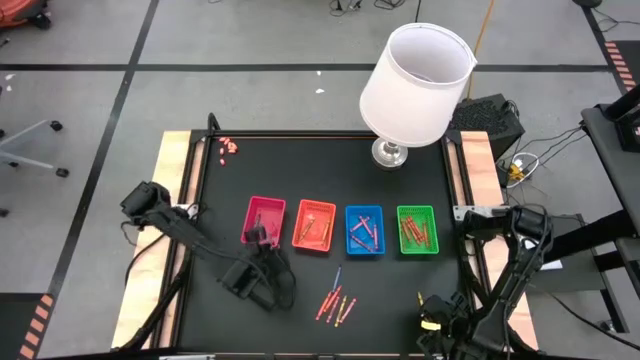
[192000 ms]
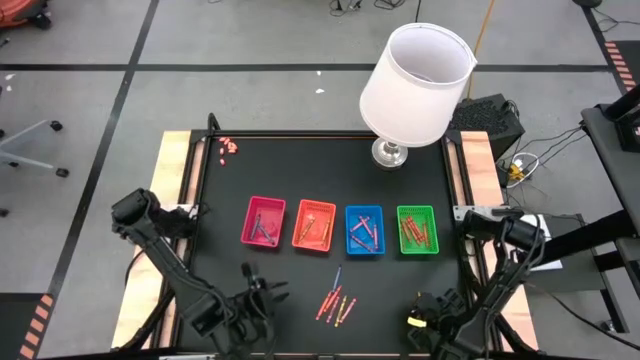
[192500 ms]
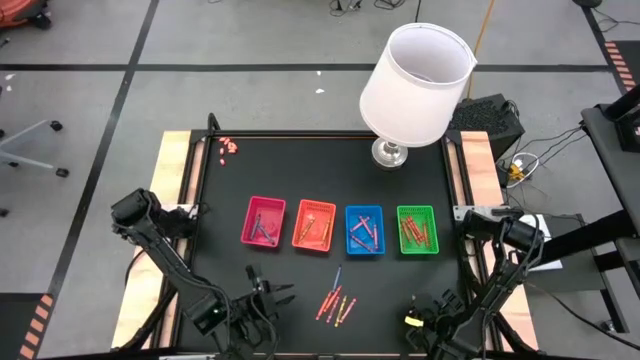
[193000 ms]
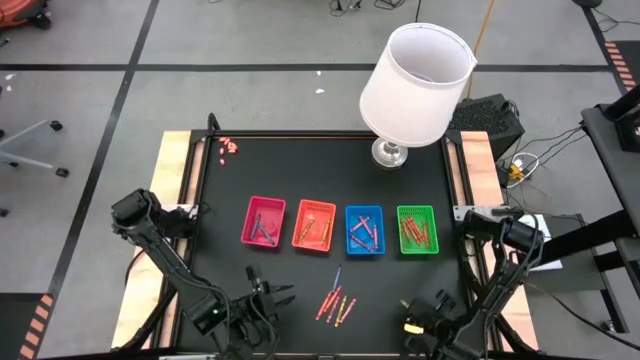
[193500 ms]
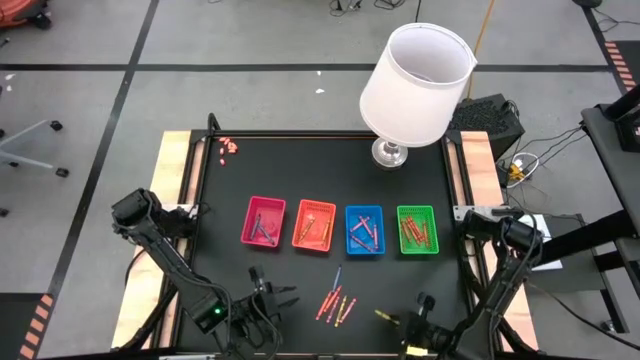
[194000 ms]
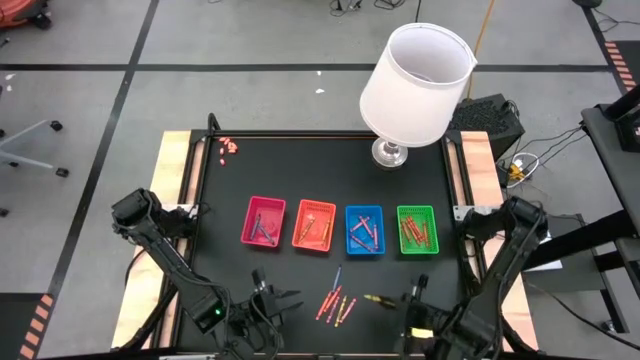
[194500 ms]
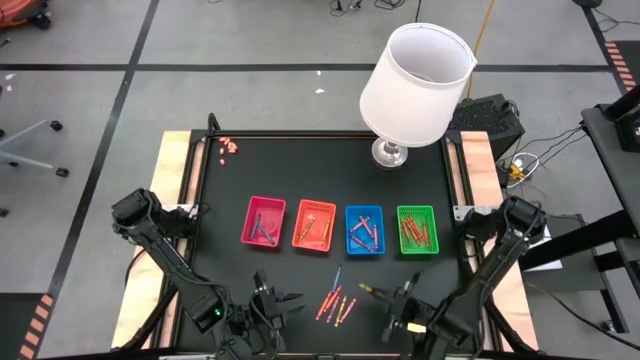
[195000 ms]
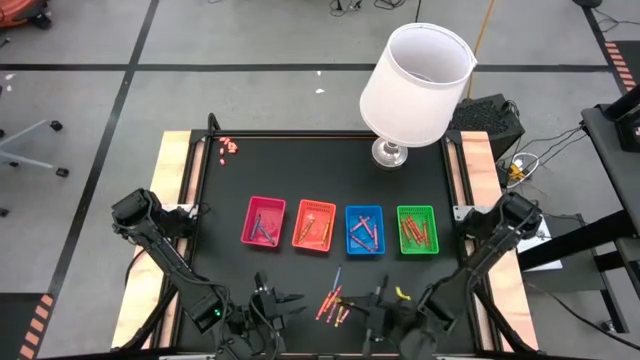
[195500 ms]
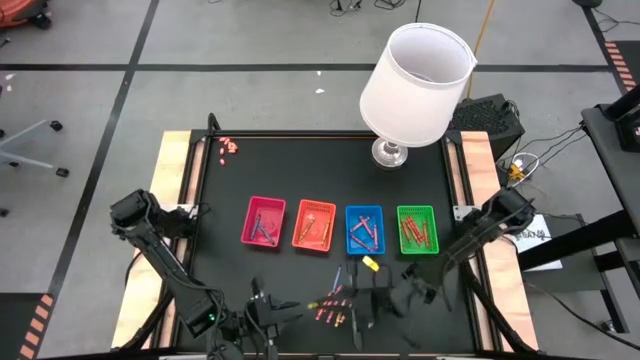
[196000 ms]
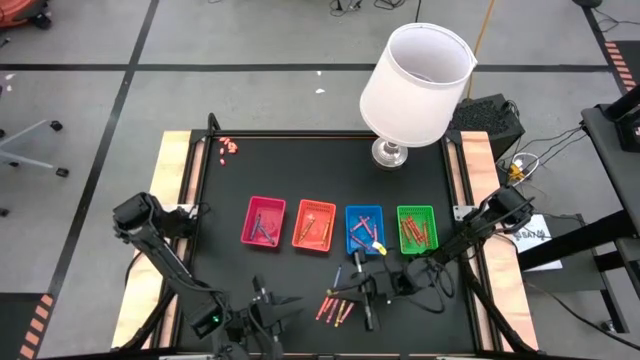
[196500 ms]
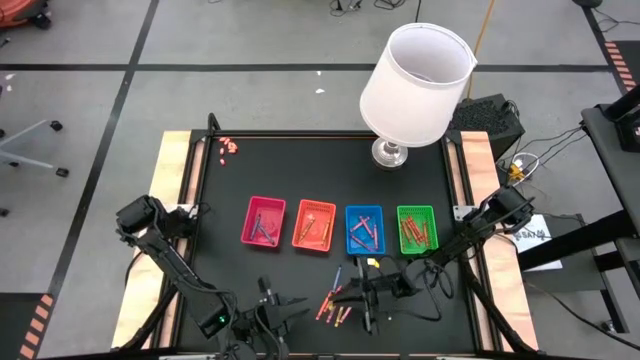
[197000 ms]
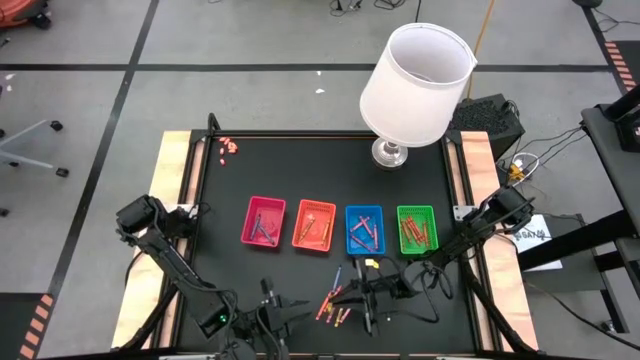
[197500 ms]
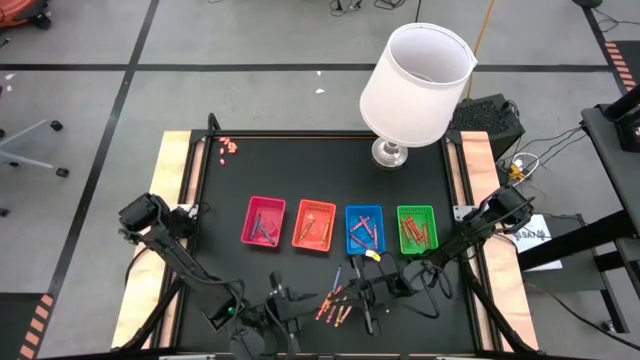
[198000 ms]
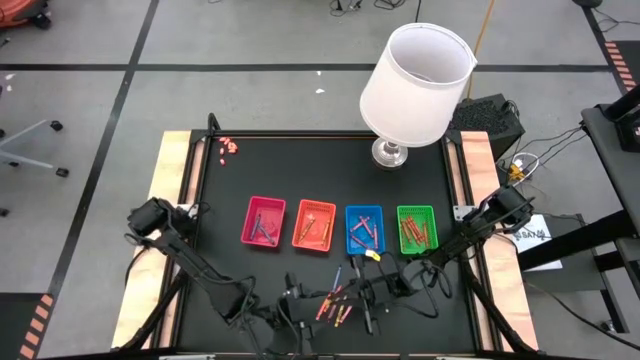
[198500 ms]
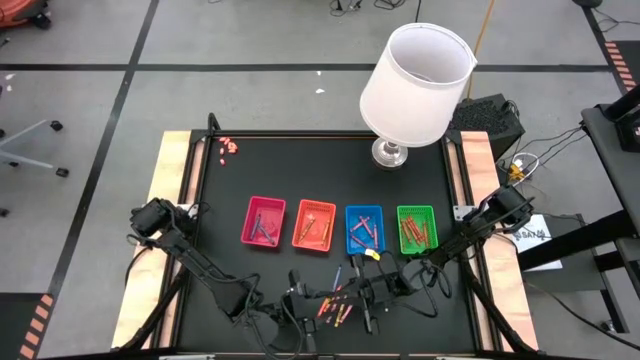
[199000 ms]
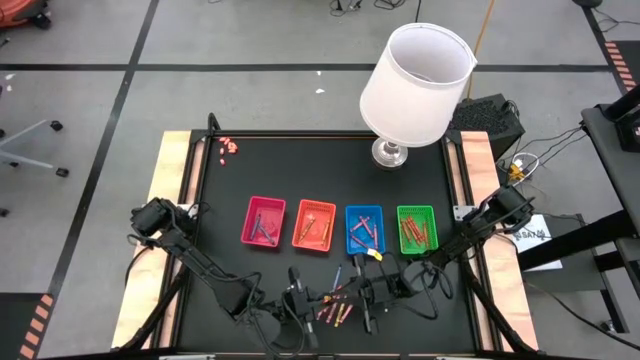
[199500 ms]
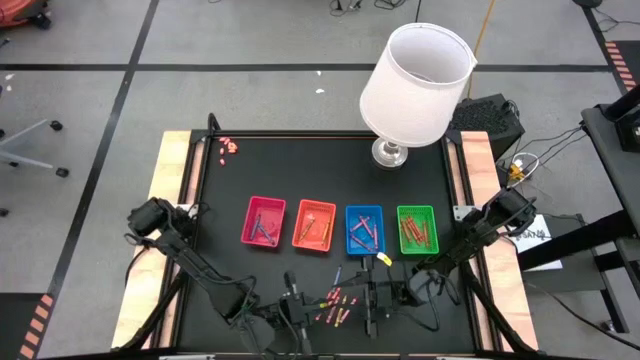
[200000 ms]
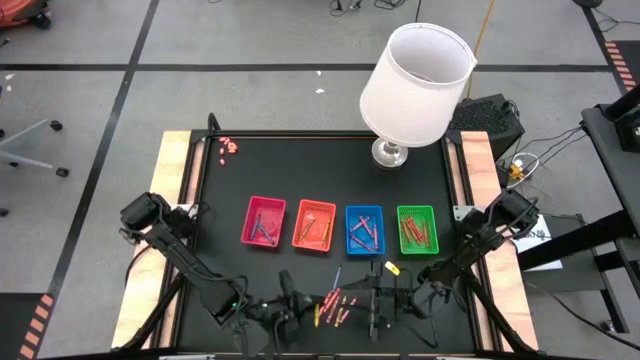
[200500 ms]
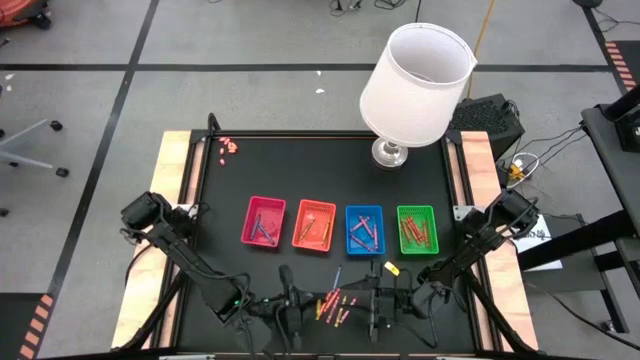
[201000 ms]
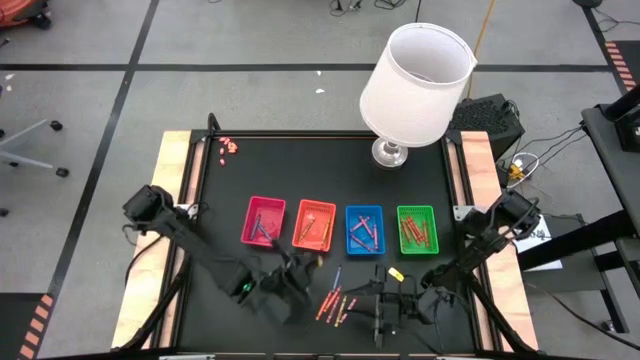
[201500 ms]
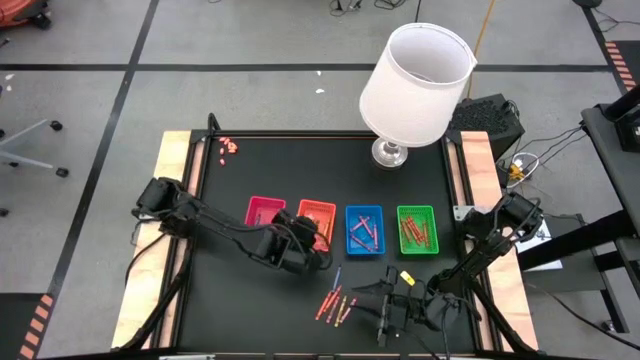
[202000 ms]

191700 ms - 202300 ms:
Task: Sort crayons
Put the yellow crayon into the orange bin

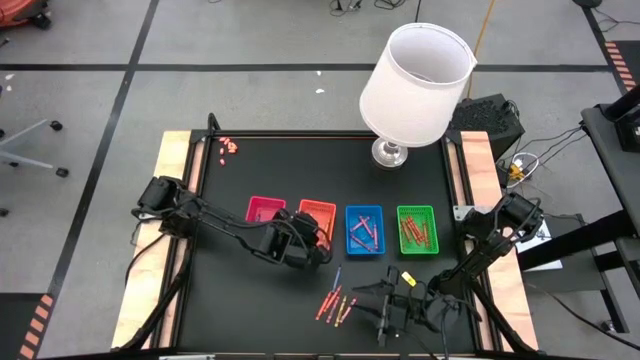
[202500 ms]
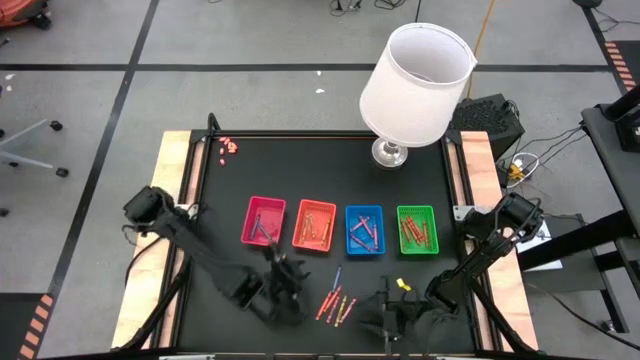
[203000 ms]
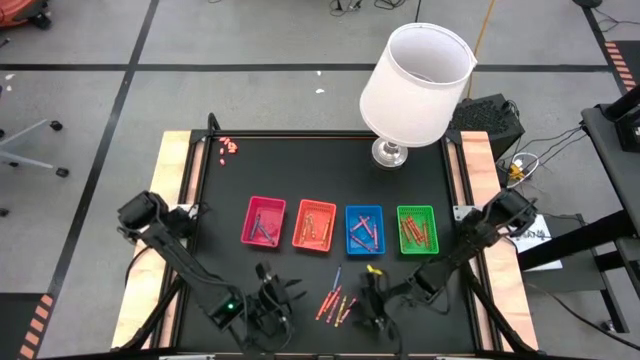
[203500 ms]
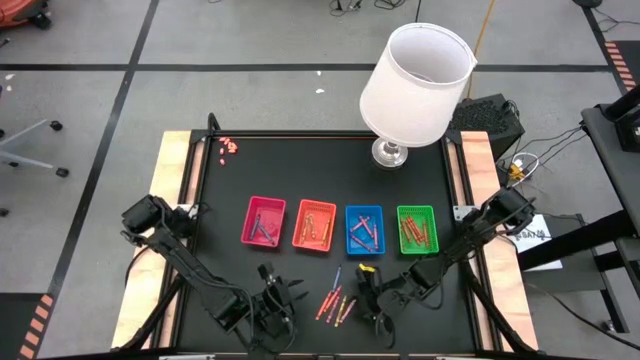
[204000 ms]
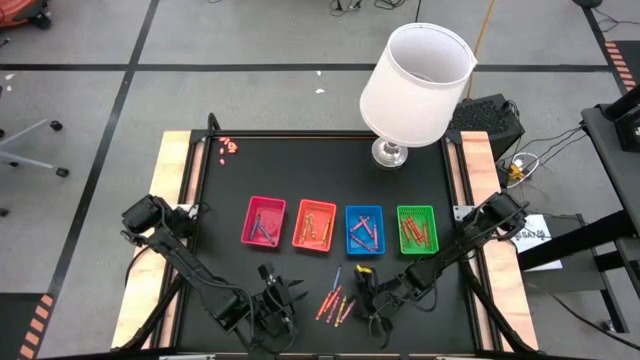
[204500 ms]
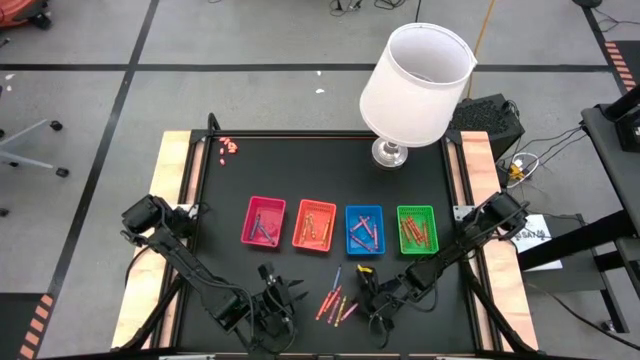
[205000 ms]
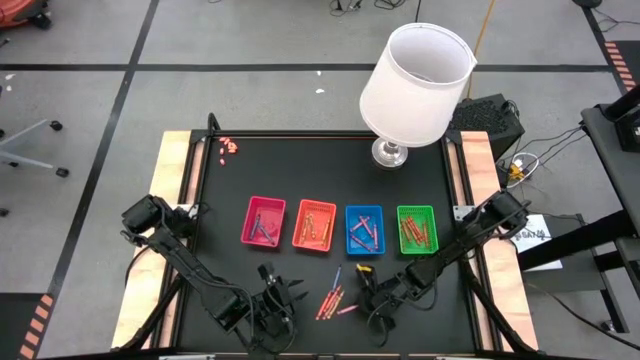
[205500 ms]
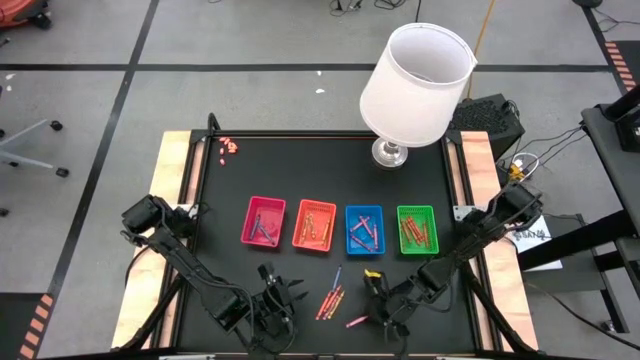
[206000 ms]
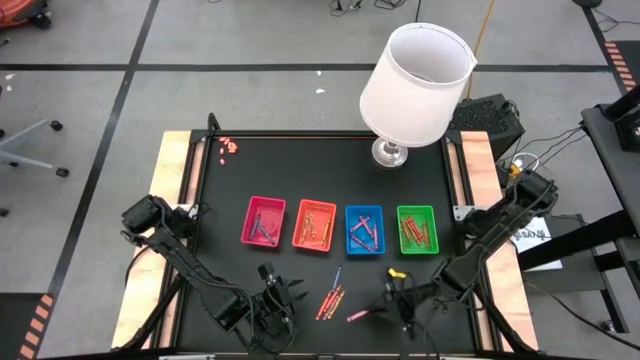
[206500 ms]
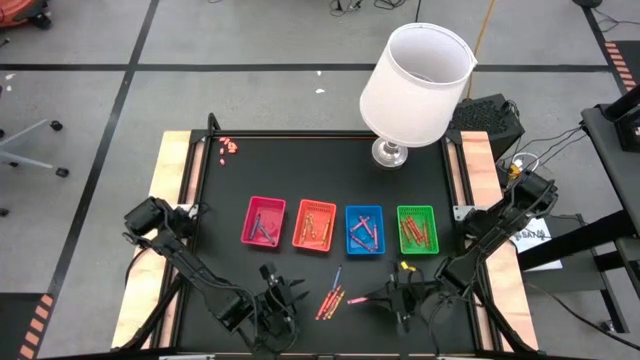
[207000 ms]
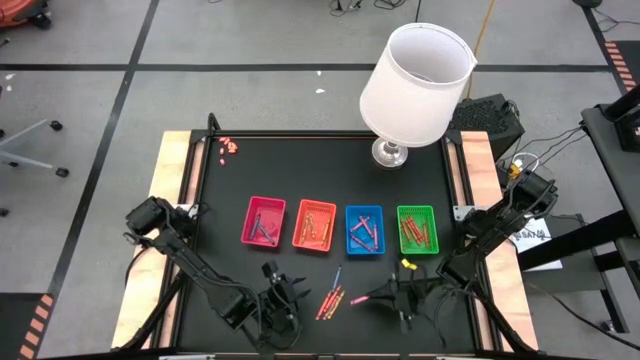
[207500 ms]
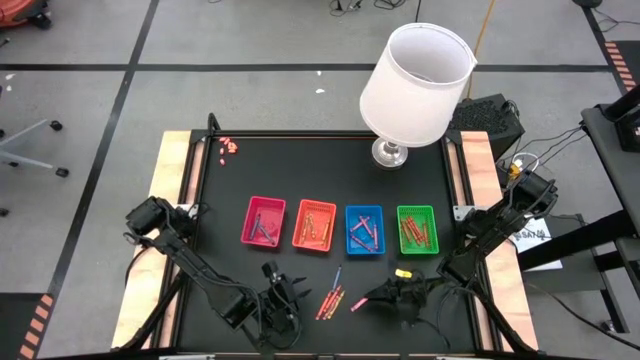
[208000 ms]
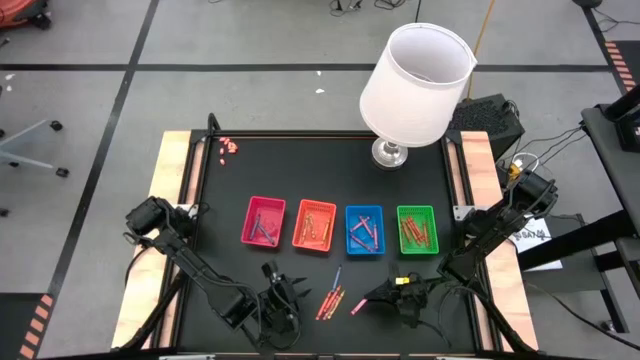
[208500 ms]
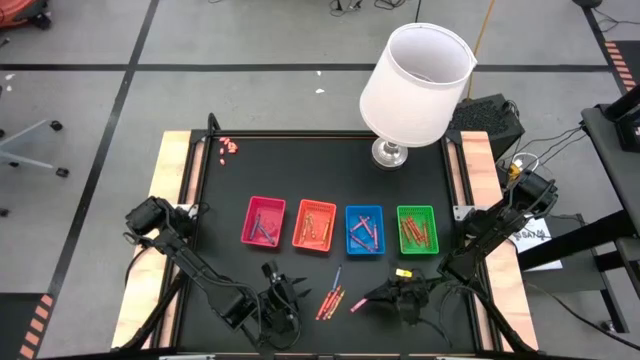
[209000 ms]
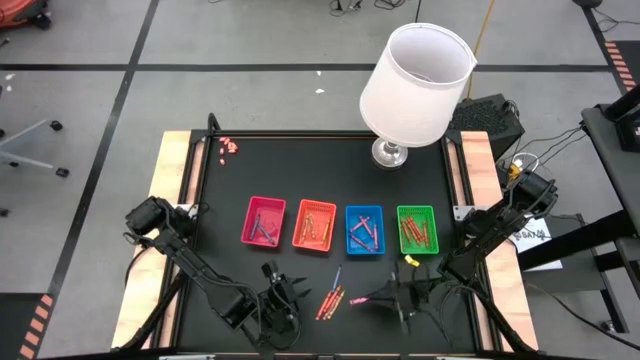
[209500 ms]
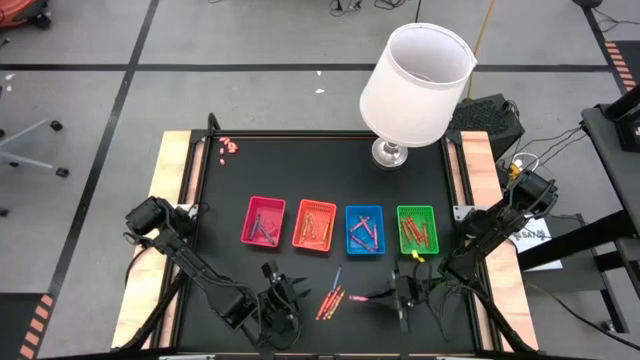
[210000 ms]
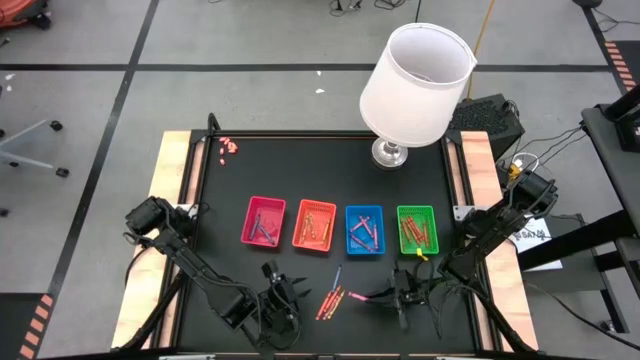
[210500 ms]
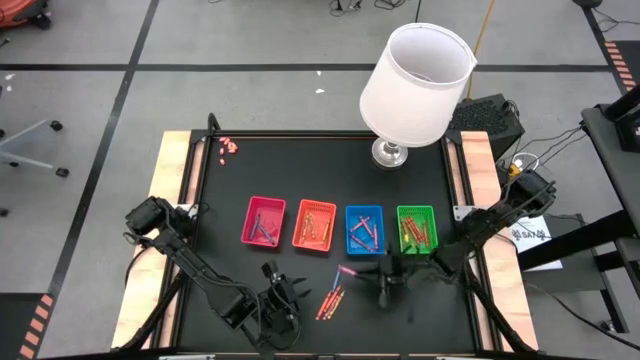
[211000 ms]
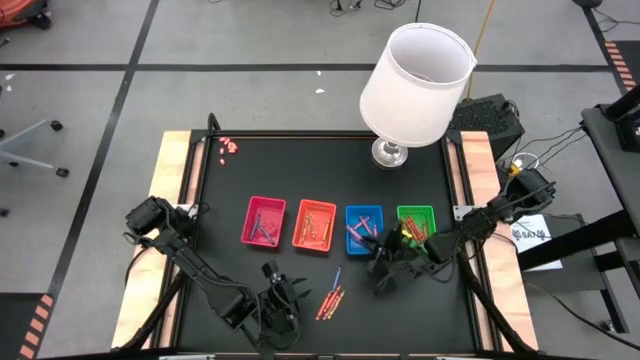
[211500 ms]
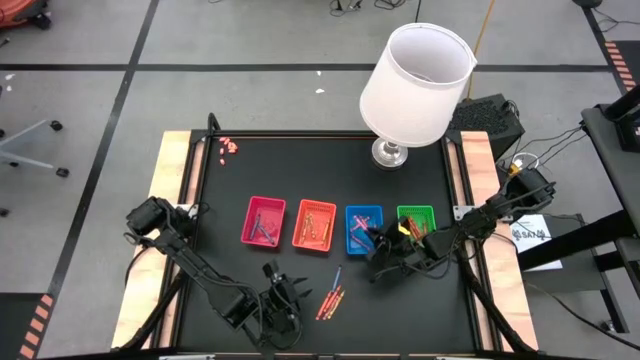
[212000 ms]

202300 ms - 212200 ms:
Put the red crayon into the blue bin
